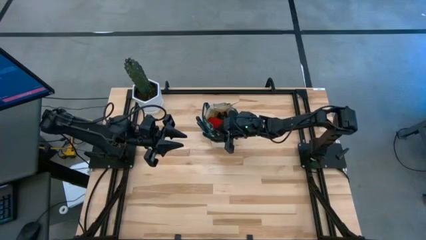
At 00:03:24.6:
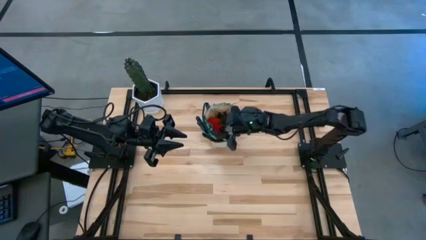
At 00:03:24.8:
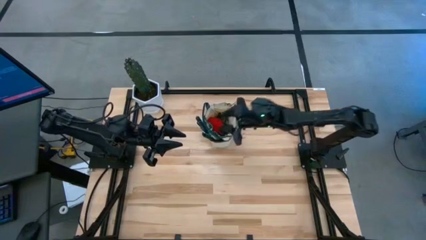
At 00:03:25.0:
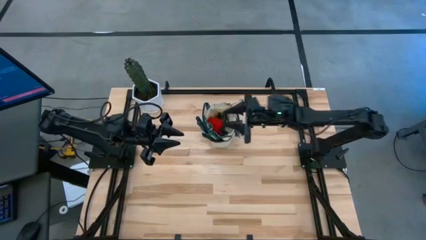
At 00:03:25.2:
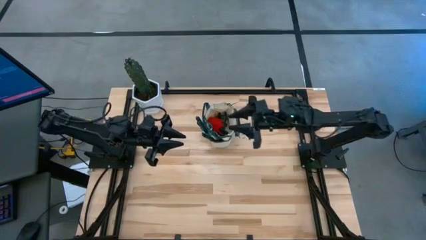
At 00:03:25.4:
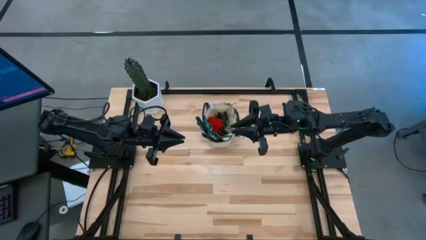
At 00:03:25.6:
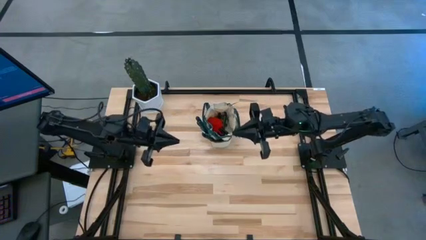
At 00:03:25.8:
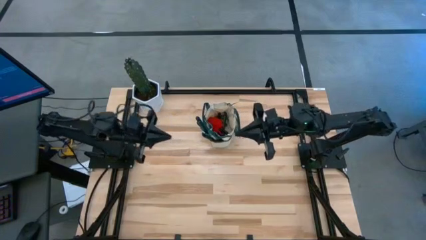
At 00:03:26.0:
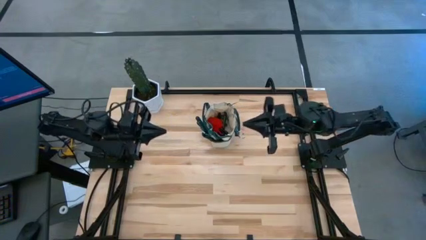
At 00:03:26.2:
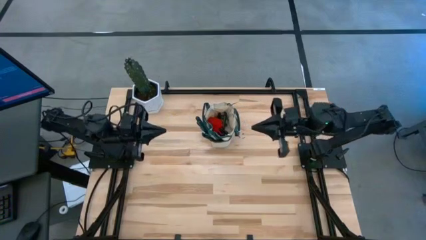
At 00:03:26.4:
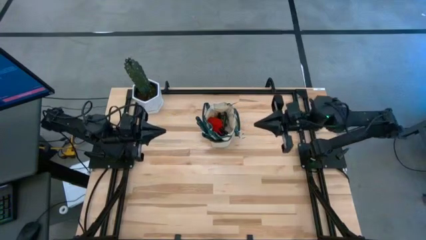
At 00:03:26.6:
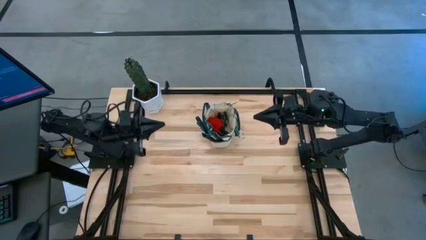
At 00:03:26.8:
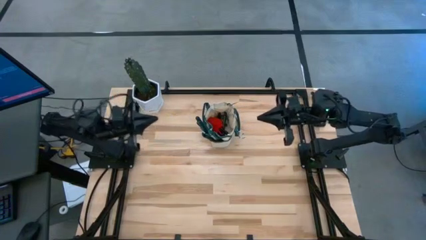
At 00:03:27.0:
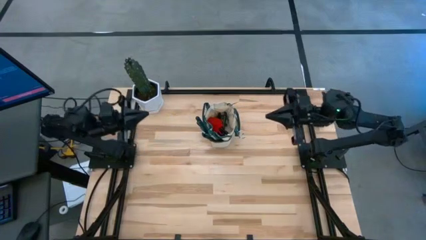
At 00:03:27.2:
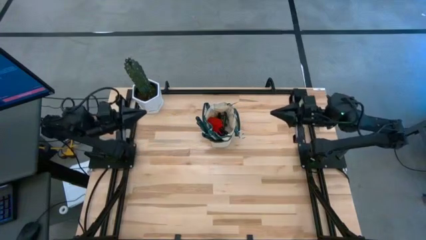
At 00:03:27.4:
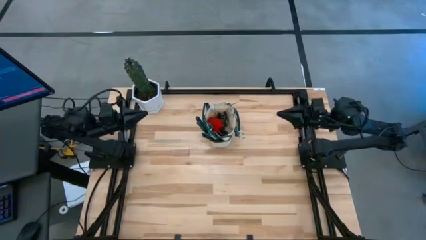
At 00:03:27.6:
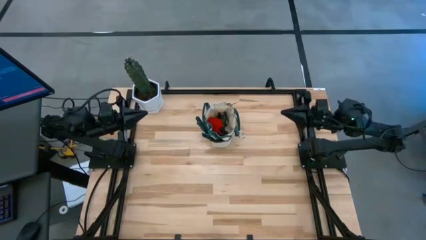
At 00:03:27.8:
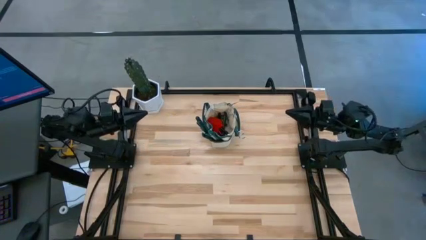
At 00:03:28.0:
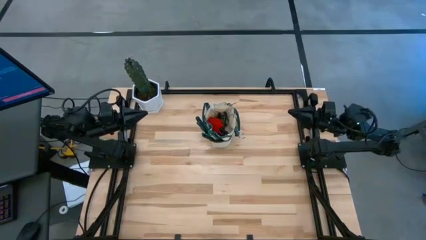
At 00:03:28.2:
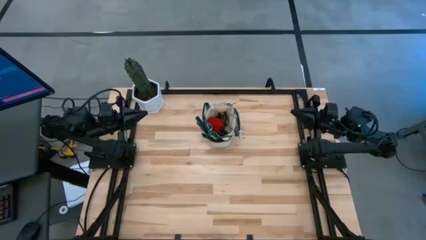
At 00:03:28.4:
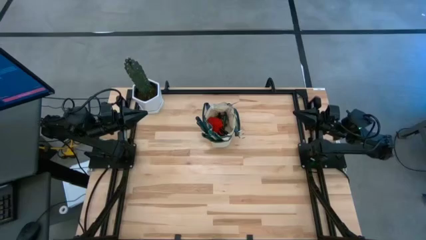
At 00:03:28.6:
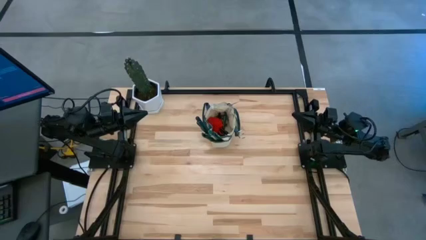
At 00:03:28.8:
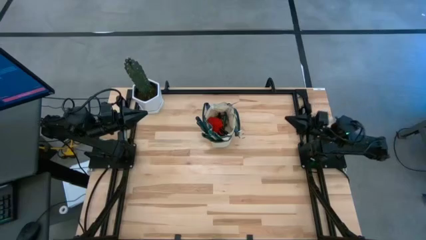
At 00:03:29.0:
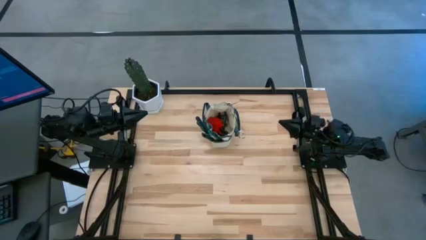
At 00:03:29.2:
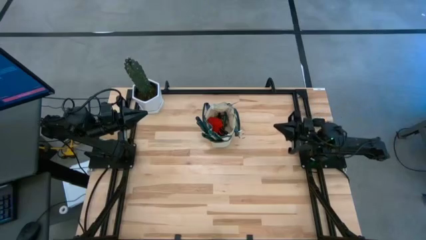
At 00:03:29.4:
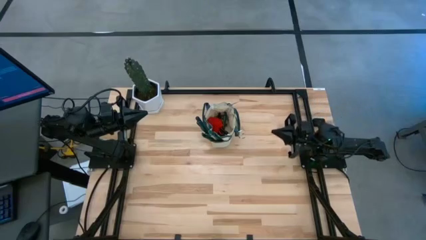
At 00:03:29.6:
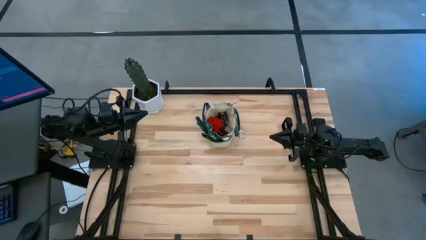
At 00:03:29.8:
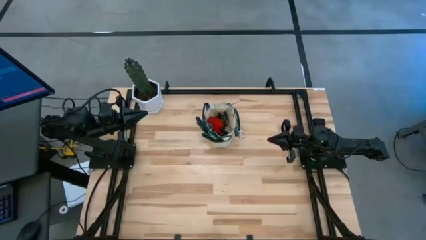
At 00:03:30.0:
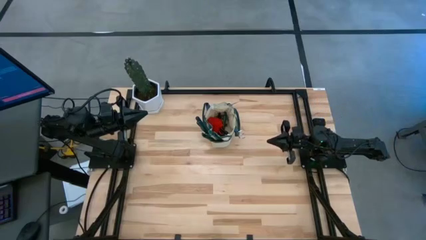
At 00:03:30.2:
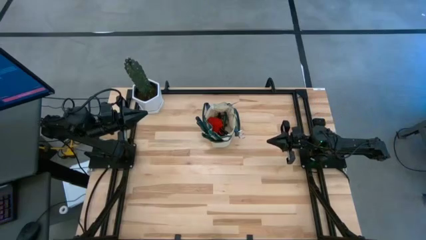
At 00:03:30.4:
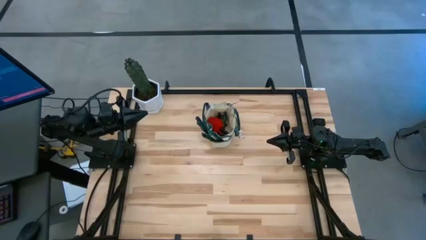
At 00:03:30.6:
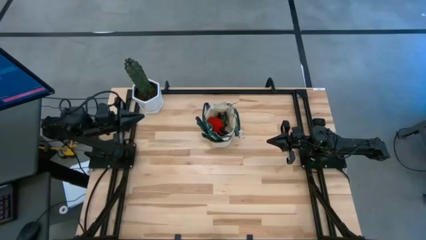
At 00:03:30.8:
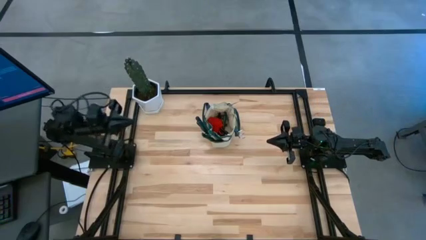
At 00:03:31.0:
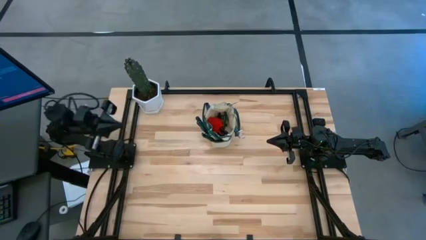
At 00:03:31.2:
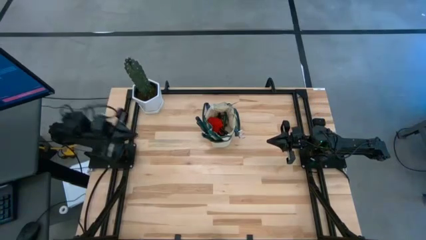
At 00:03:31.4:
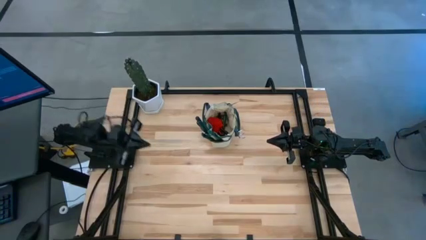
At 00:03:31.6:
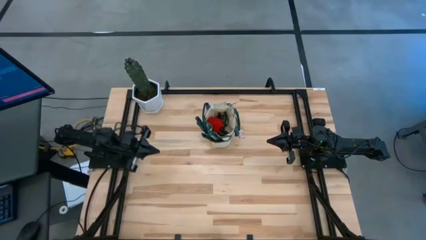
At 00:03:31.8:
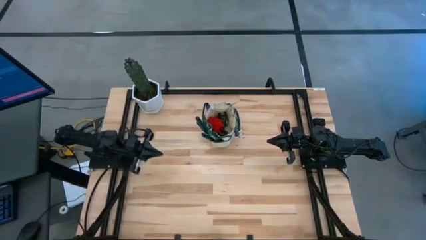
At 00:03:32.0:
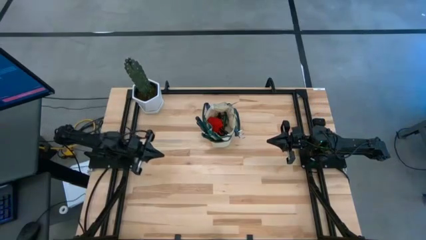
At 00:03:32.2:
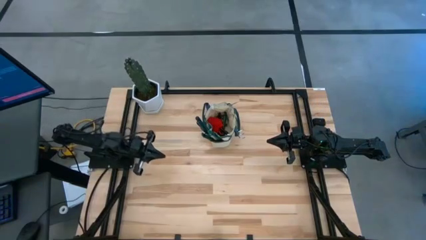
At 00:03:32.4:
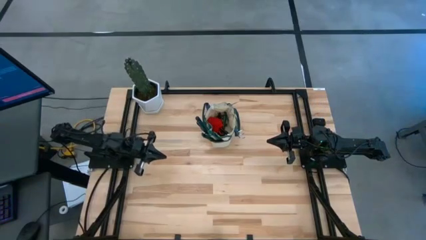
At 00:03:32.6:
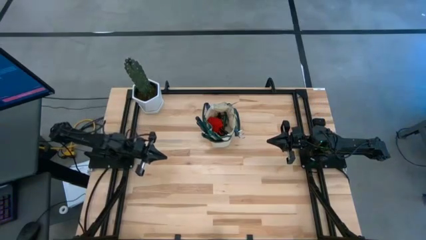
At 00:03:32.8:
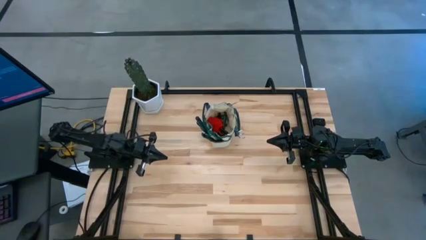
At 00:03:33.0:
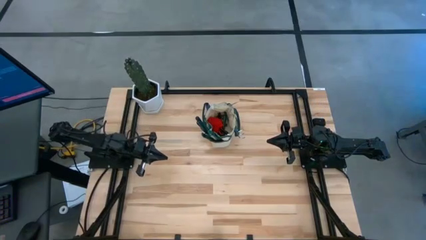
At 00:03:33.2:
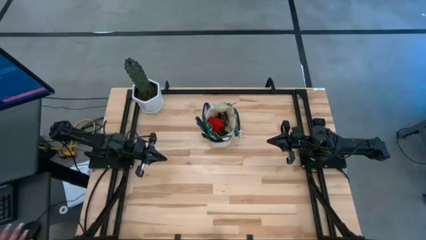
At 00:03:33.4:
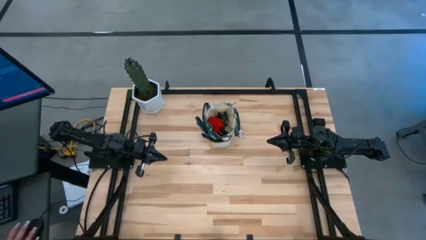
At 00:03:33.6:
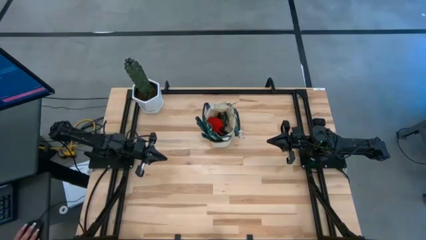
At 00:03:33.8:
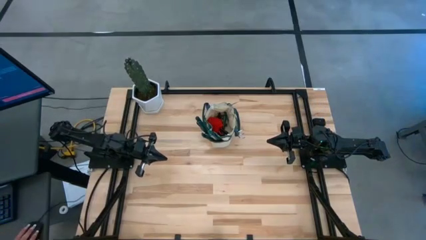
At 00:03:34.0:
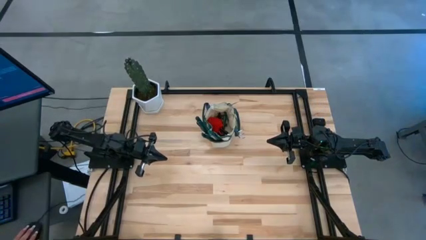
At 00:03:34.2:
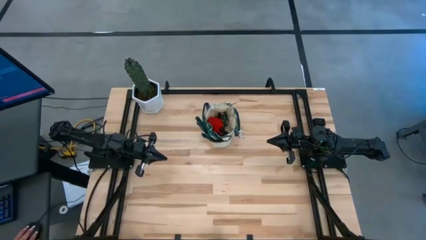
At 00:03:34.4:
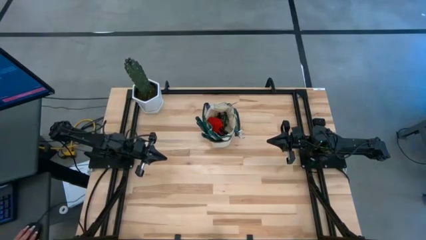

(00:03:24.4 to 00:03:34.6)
Task: Pick & Place Garden tools in Gardening bag
Return to Home Position

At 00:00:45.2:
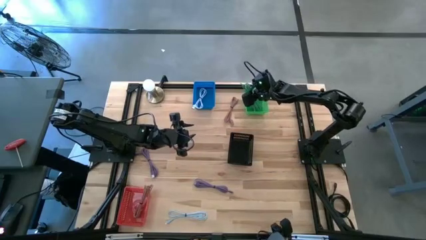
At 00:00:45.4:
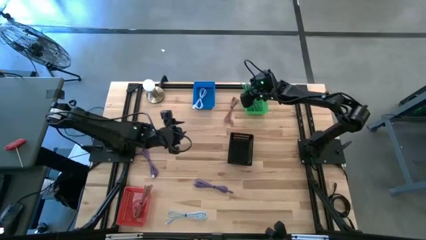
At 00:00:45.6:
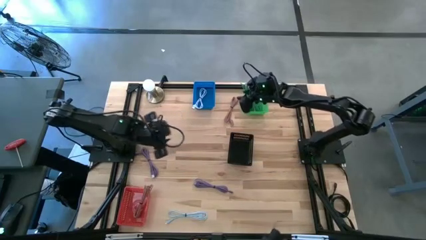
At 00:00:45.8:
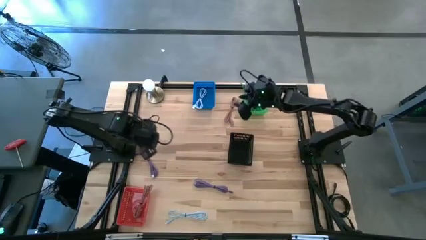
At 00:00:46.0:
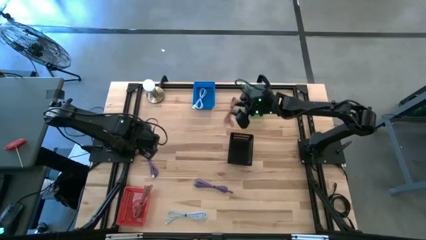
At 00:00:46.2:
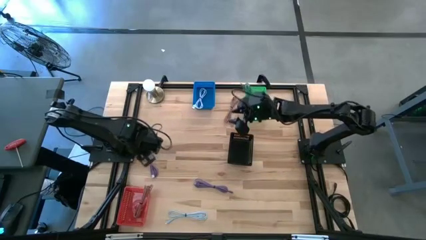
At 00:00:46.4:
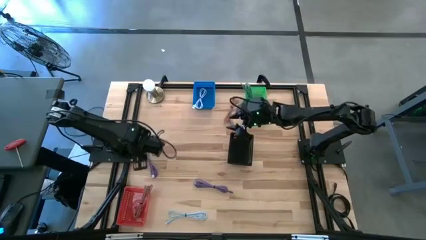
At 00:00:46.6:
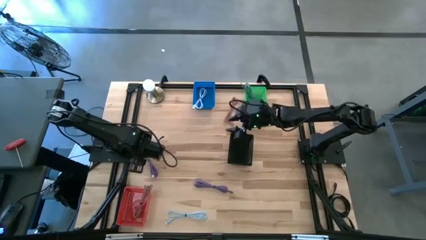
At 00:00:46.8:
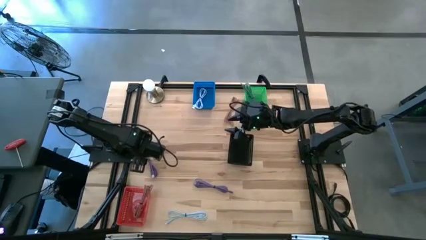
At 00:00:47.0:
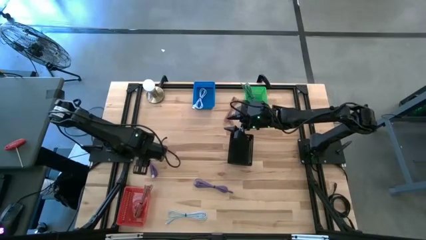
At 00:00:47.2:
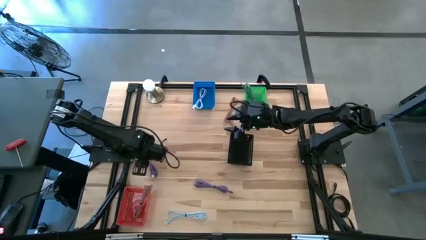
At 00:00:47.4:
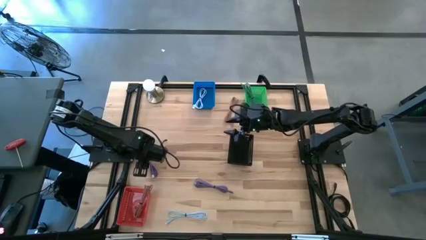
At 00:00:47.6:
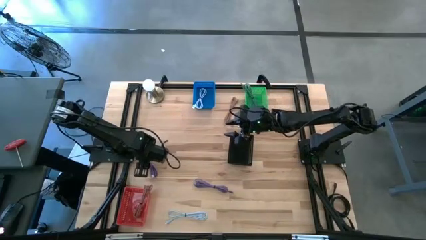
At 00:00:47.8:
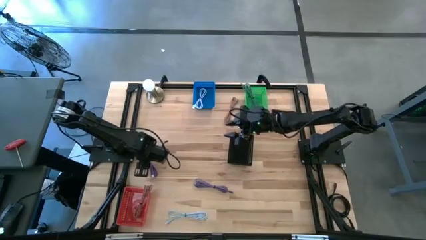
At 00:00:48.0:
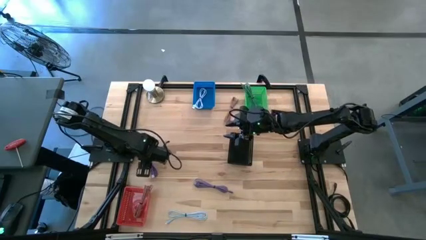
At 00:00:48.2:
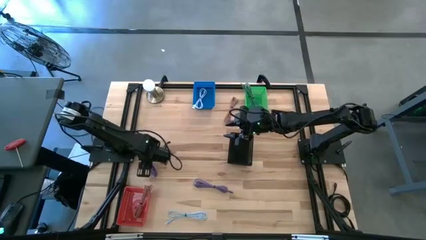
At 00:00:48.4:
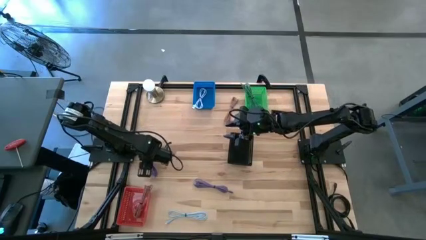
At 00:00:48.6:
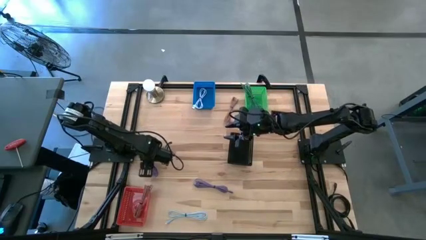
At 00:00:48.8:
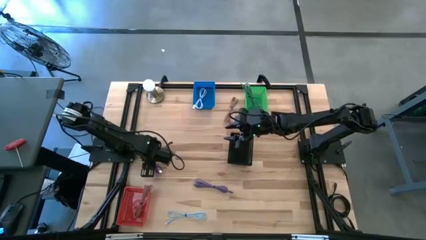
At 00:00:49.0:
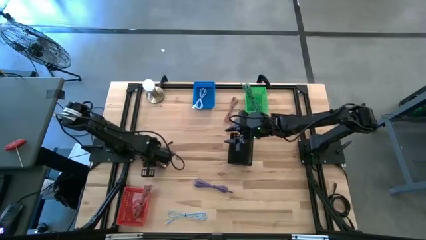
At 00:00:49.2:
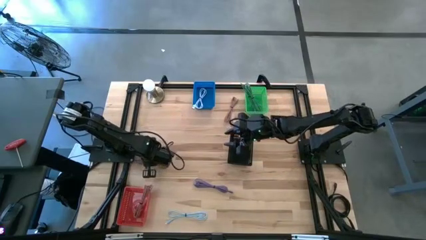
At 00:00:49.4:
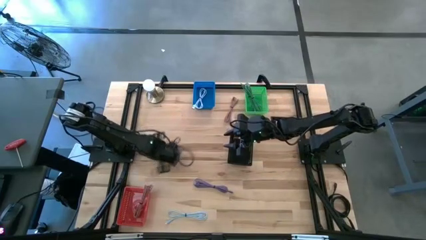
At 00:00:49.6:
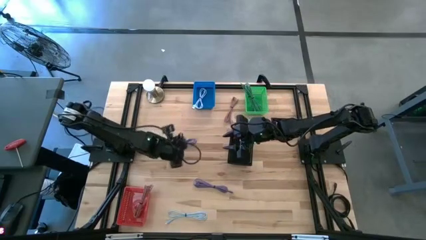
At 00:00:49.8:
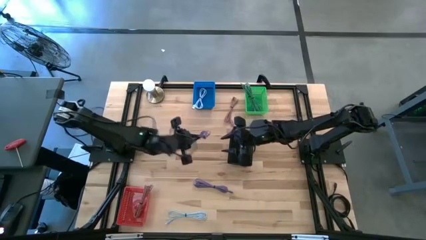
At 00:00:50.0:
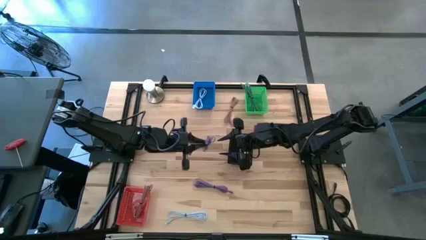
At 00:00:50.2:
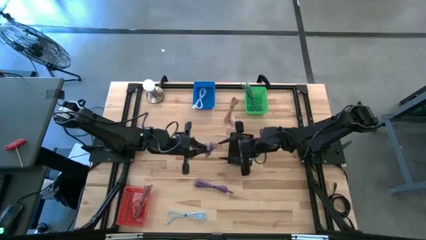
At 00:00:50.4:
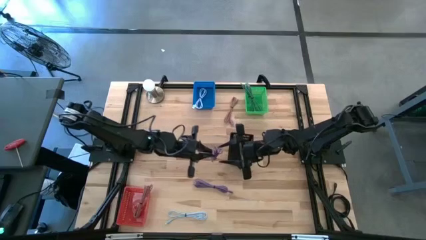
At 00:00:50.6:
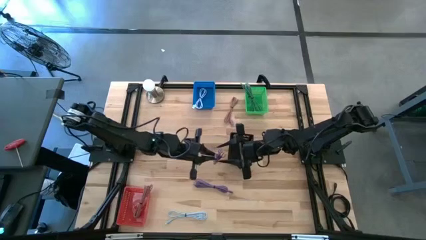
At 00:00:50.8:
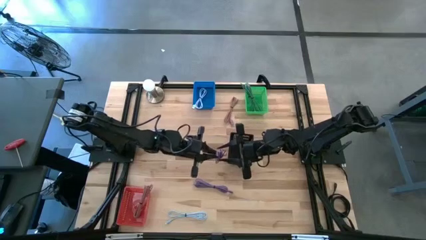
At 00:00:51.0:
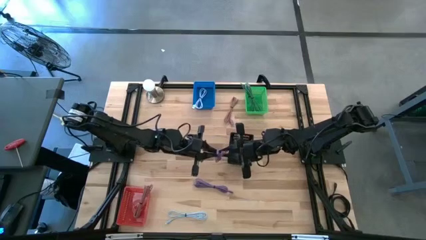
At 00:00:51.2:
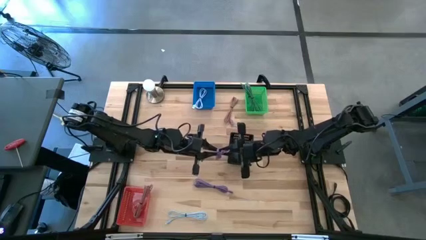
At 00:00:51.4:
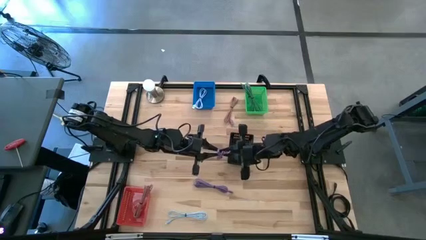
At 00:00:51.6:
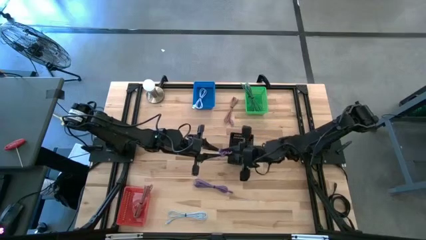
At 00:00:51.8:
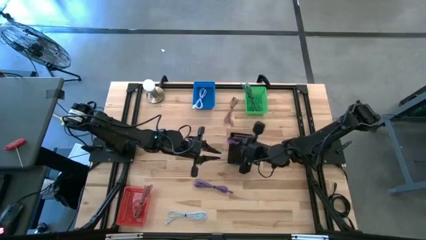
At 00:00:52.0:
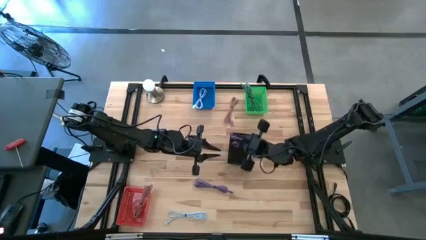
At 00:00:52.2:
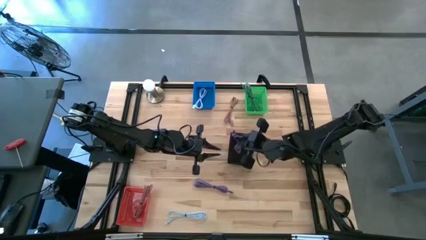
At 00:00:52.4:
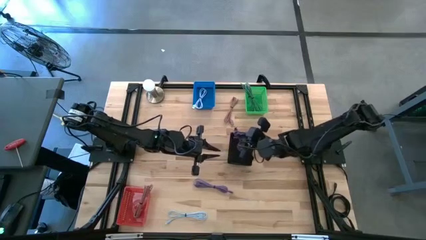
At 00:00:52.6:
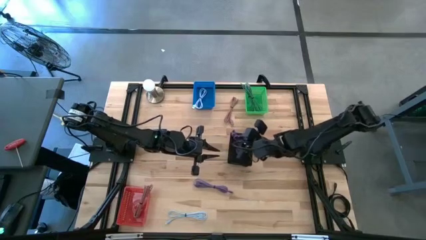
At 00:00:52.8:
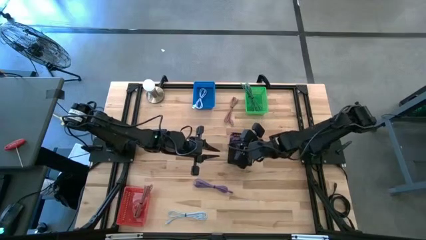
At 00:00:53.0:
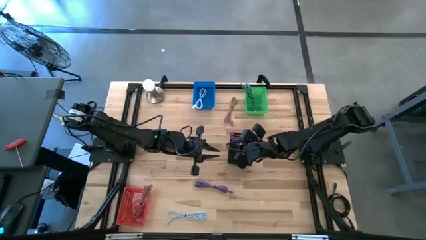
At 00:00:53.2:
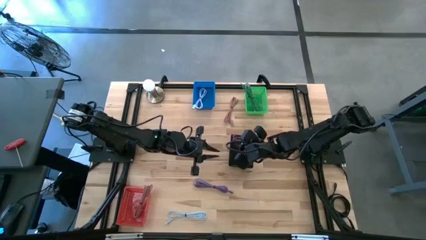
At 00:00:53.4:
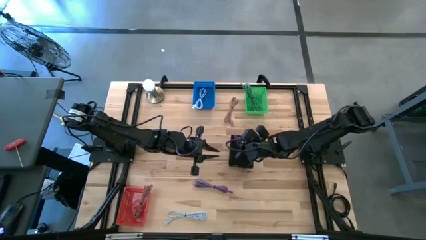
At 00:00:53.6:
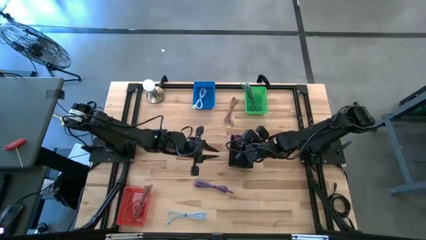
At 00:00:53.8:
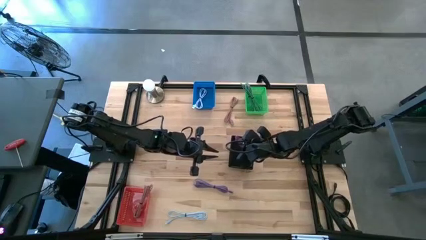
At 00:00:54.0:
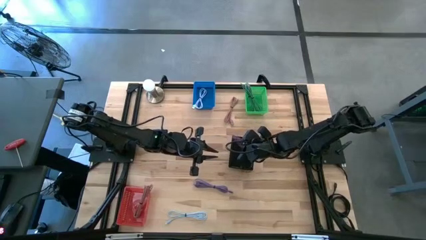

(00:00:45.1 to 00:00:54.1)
Task: Pick & Place USB Port
Put the left purple charger cable into the black bin
